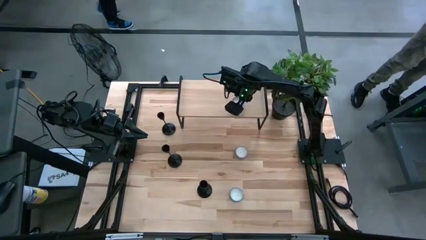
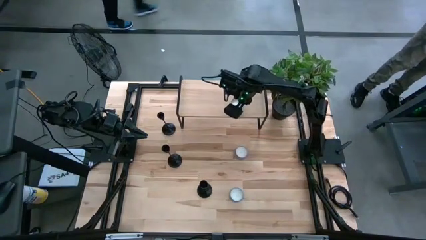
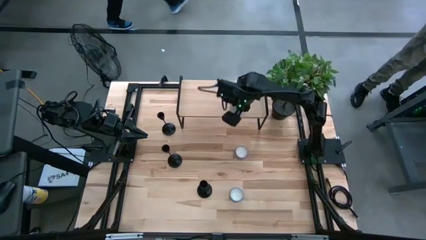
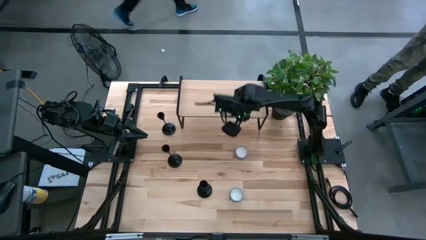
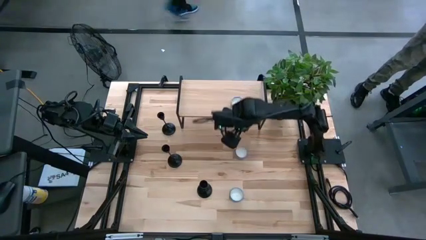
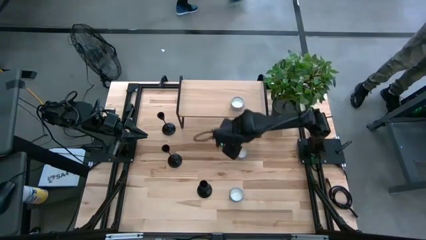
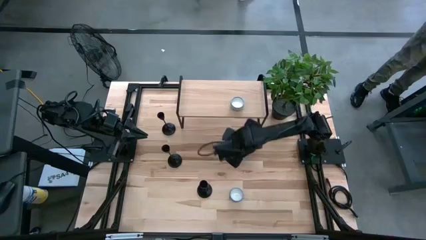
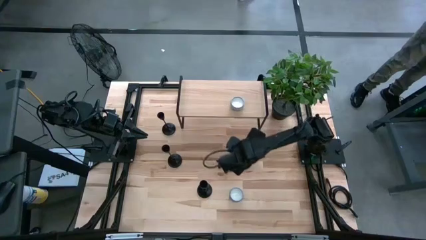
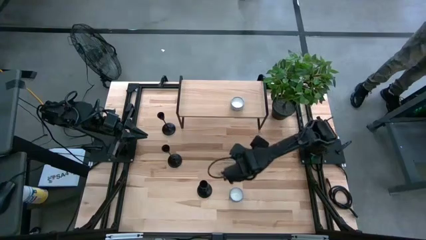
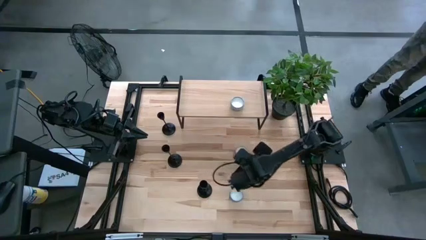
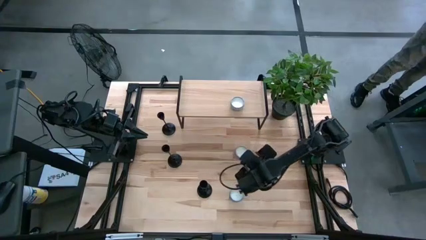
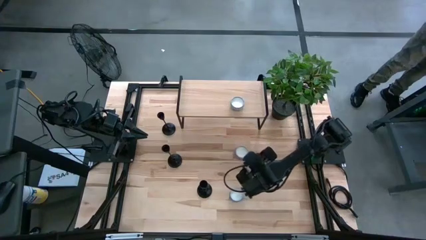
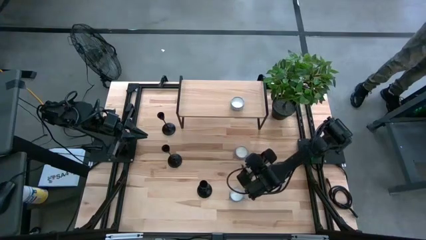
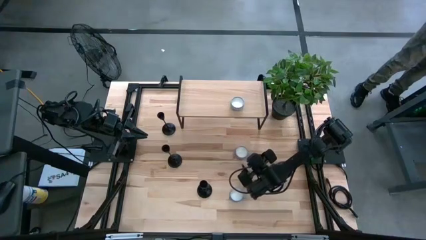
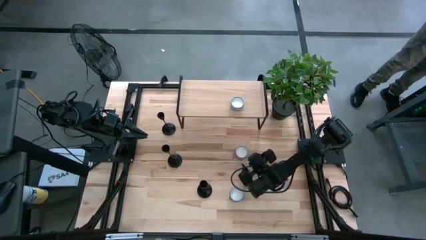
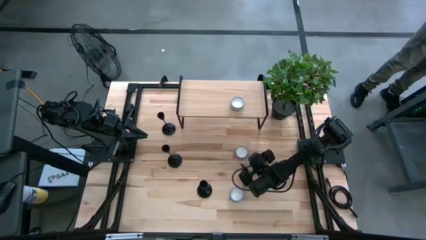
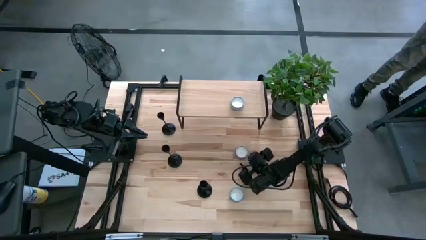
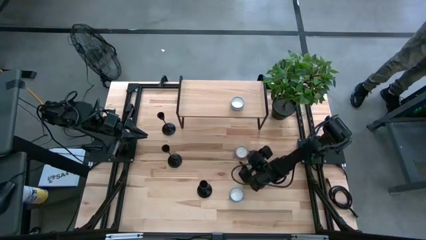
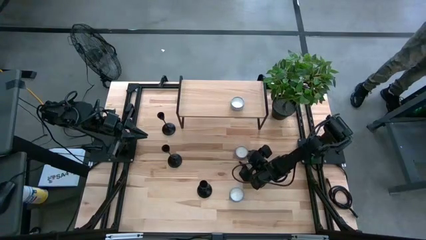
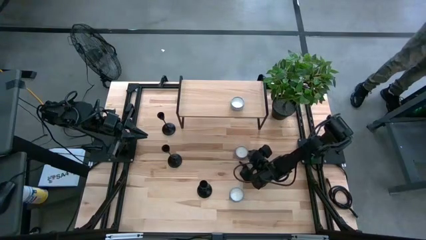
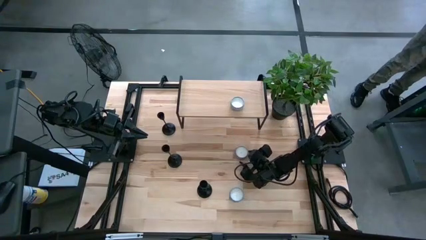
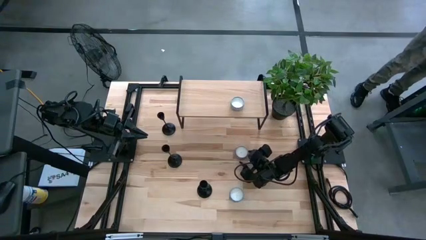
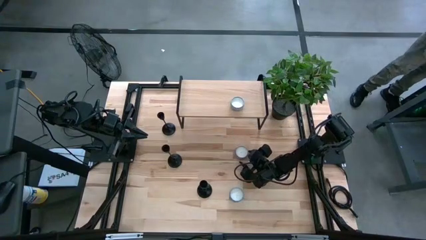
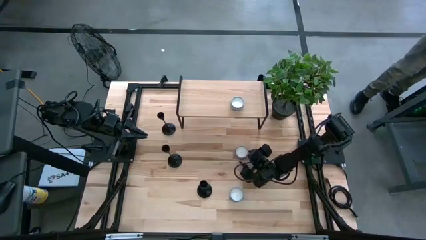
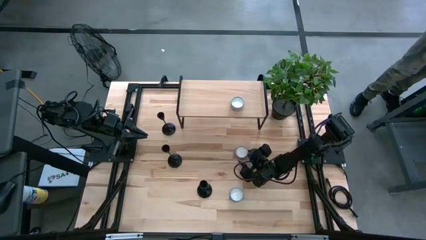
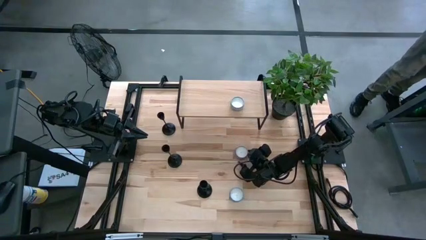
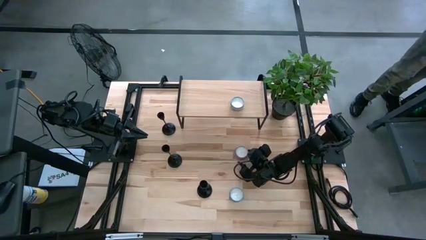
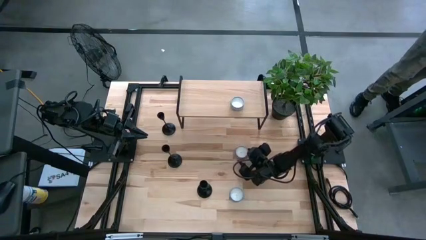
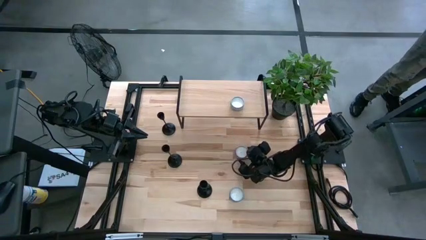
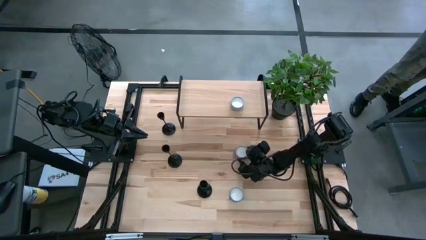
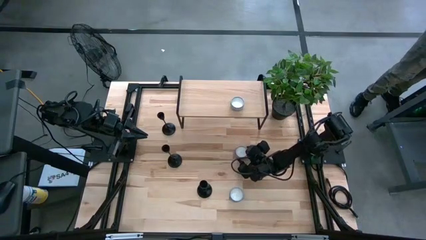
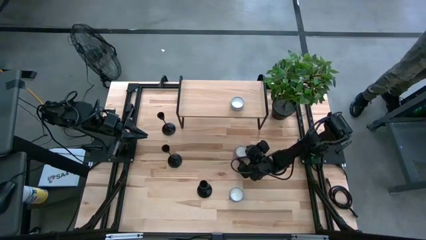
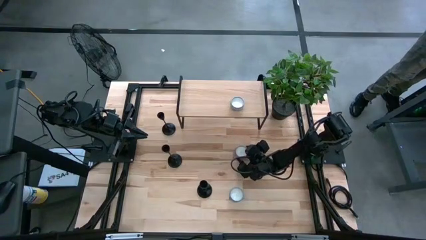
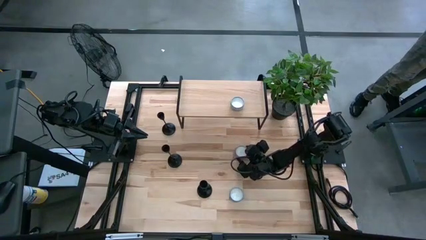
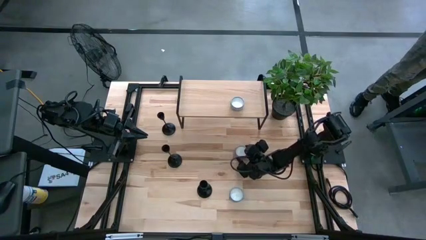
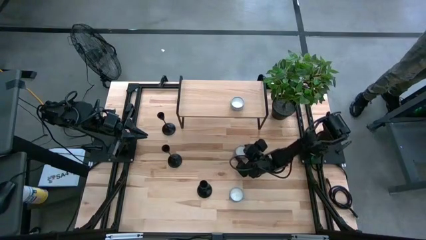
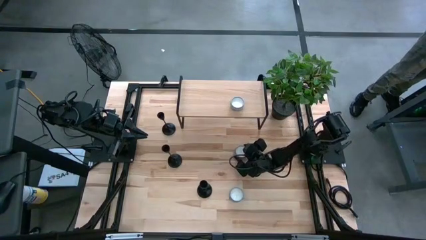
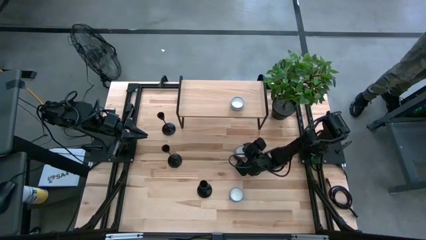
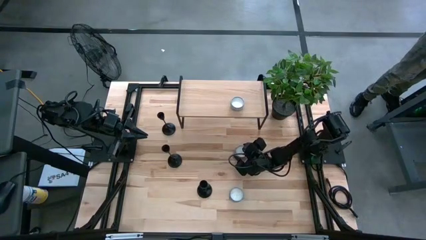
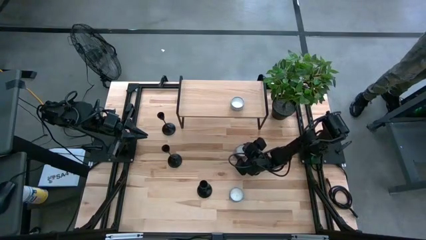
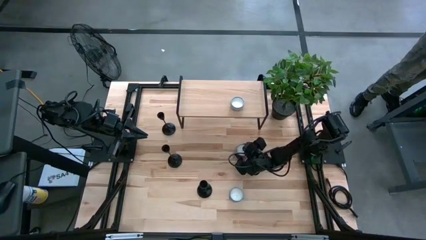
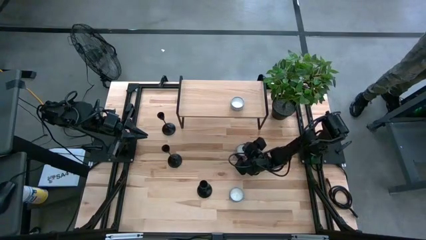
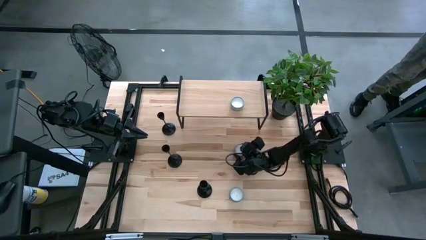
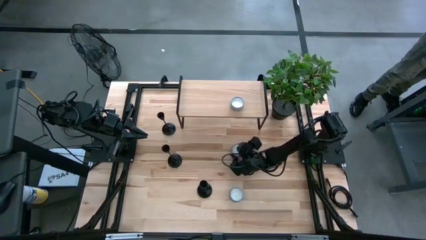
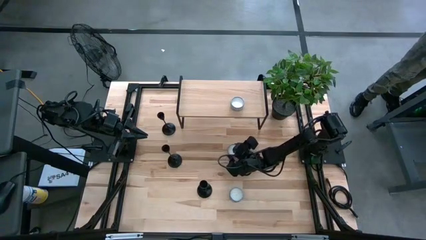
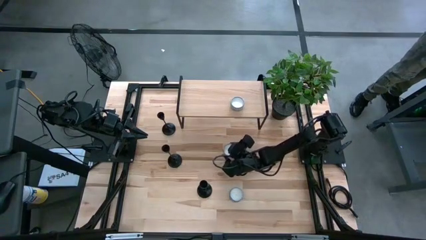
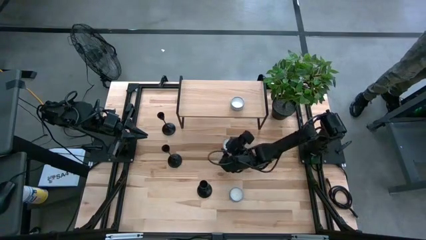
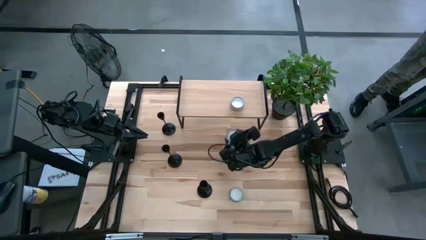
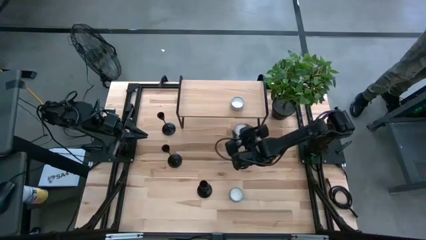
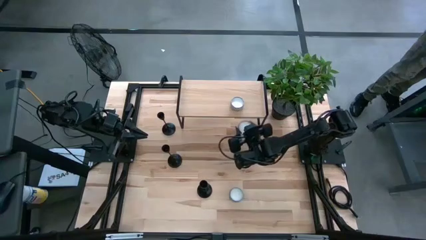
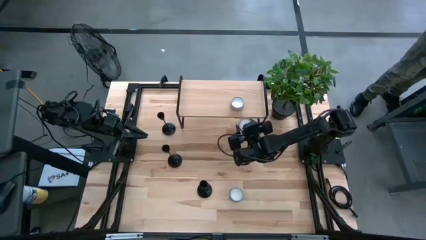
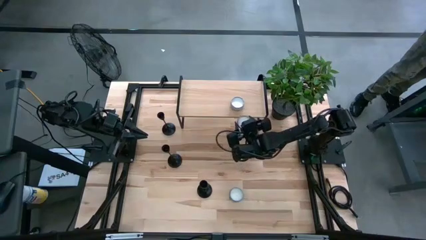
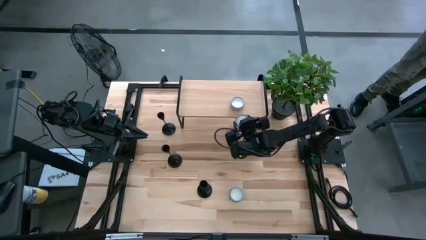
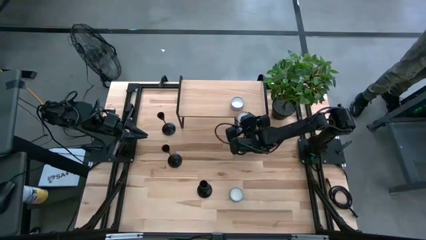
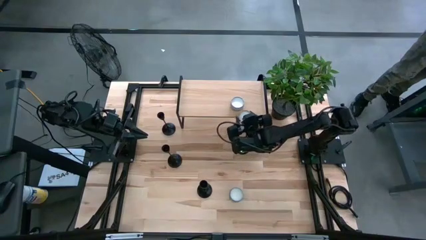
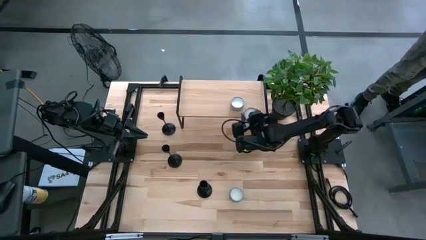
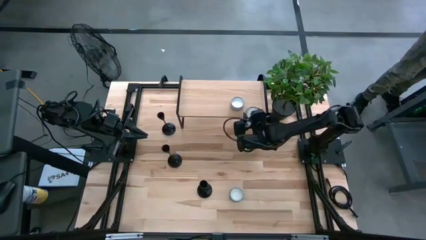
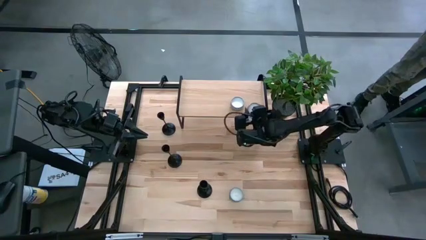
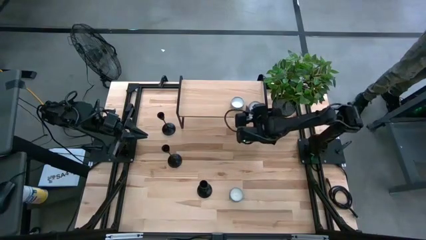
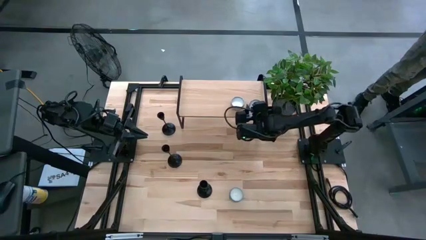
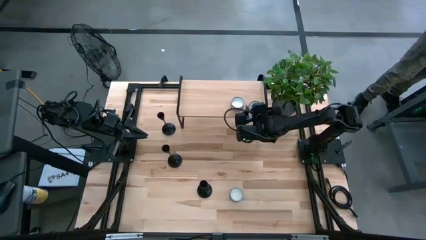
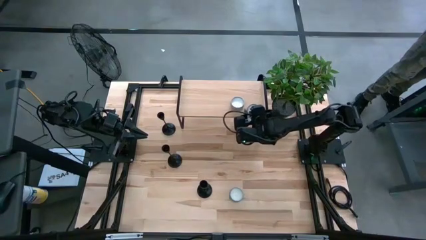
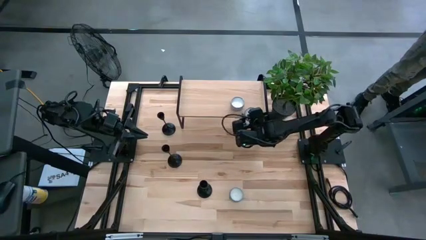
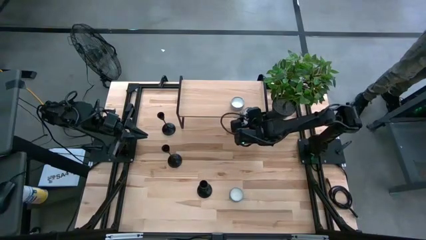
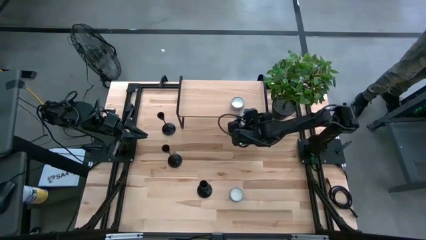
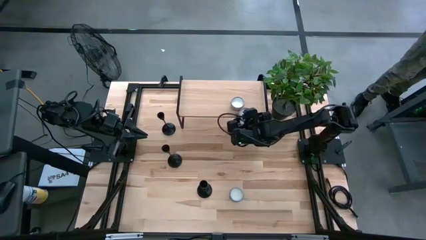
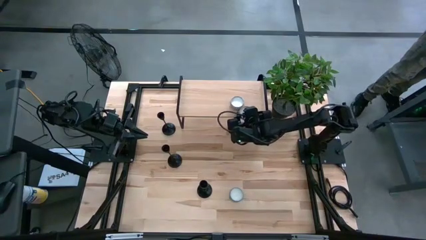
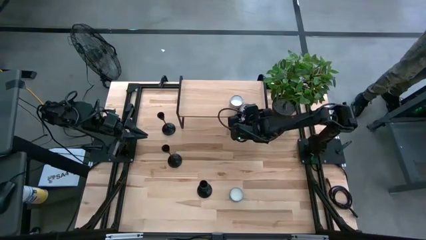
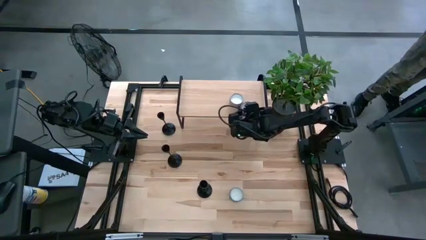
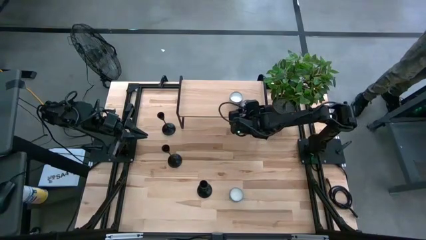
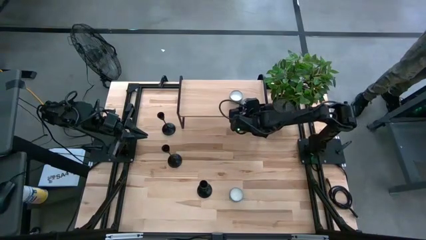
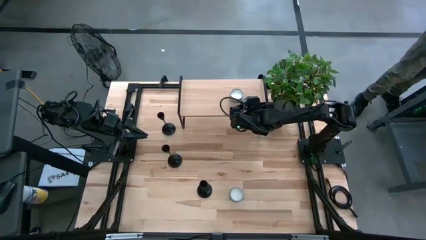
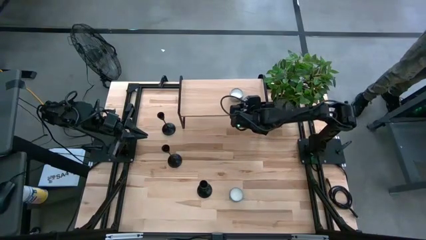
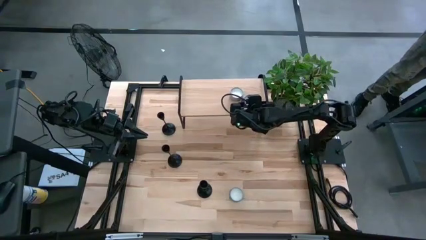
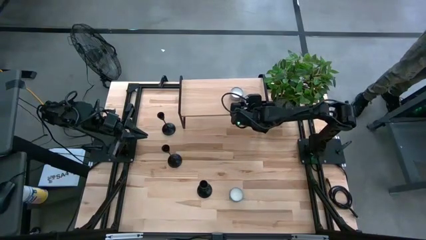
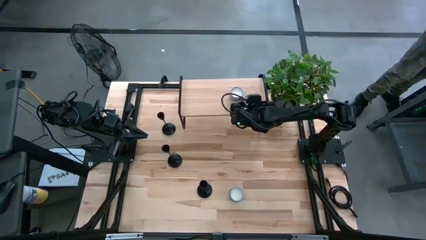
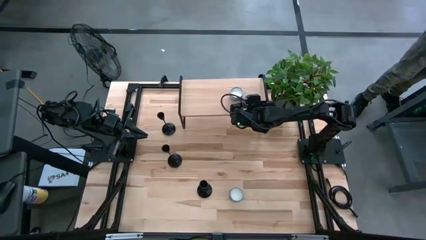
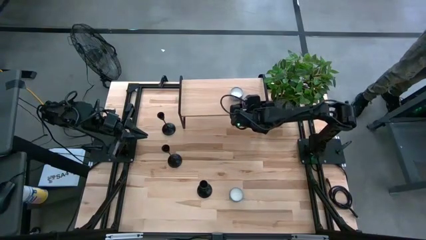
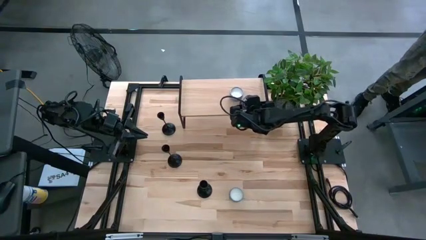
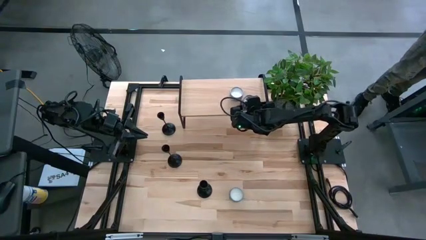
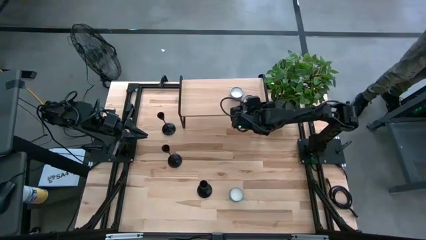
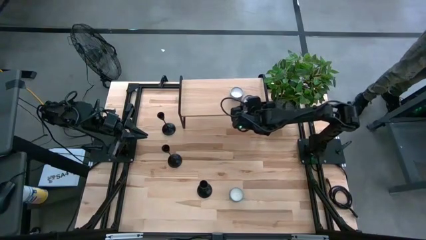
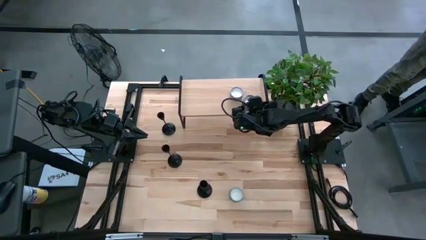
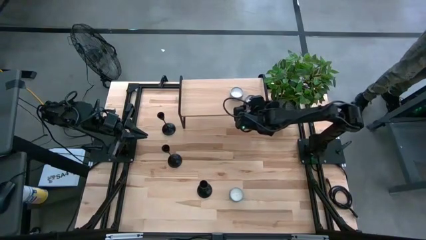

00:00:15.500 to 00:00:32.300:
Task: Pick & Place candle stick holders
Put the pink scented candle on the shelf
